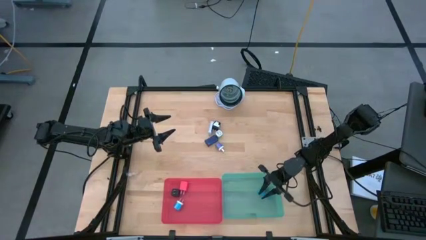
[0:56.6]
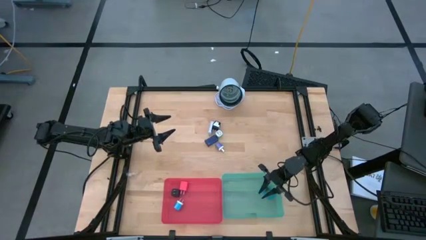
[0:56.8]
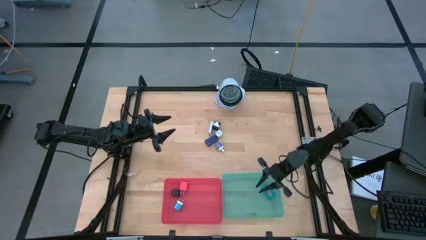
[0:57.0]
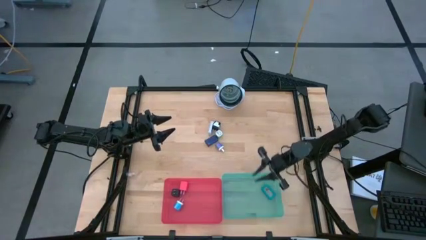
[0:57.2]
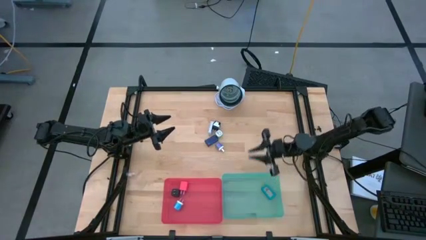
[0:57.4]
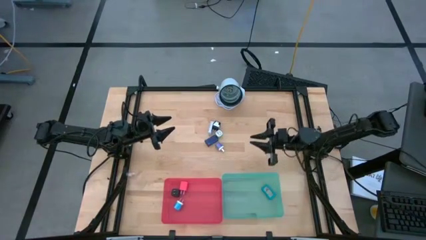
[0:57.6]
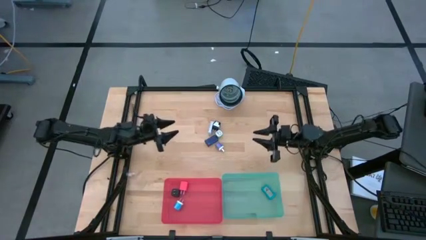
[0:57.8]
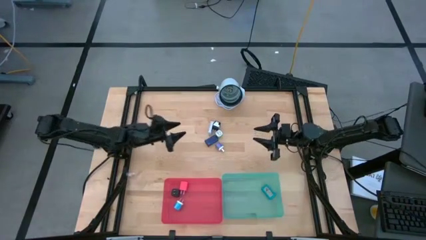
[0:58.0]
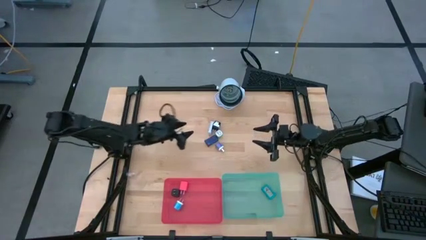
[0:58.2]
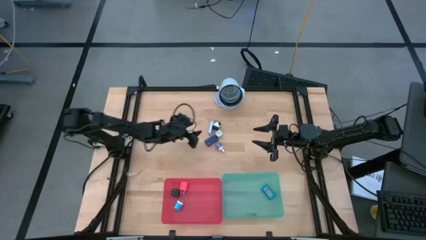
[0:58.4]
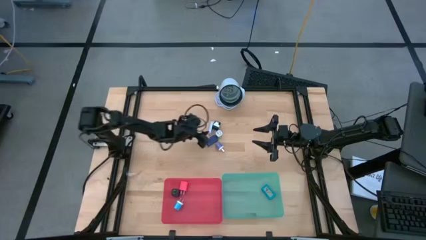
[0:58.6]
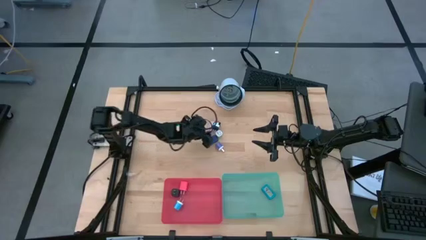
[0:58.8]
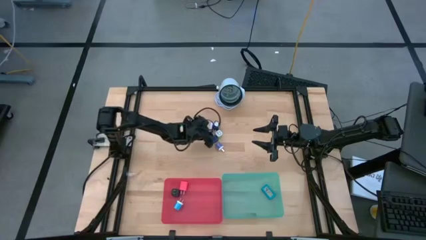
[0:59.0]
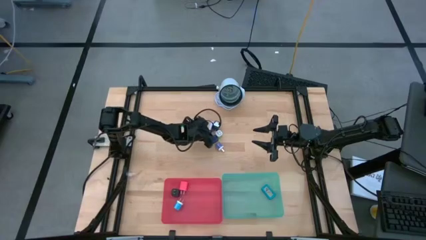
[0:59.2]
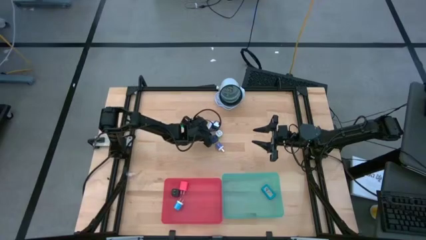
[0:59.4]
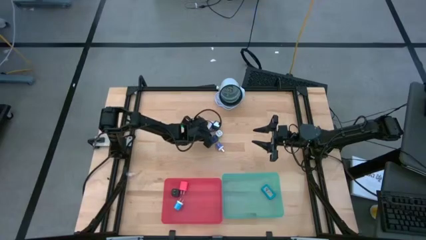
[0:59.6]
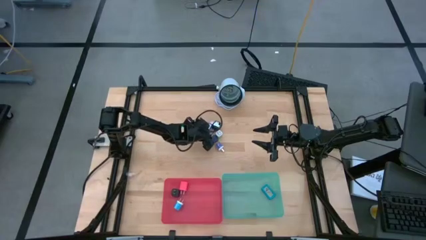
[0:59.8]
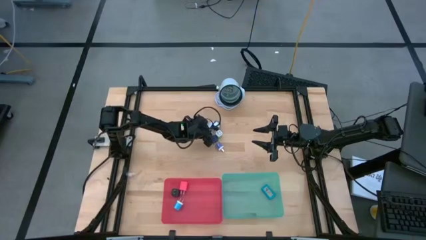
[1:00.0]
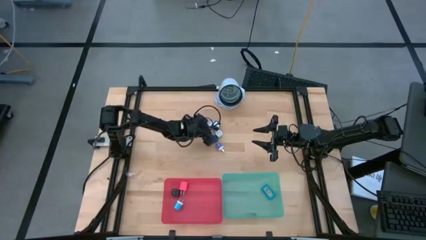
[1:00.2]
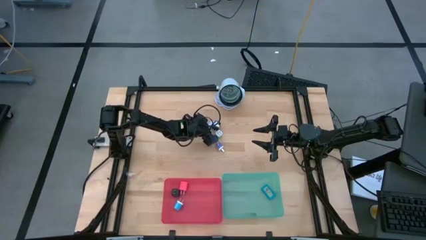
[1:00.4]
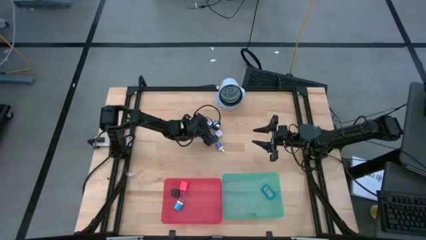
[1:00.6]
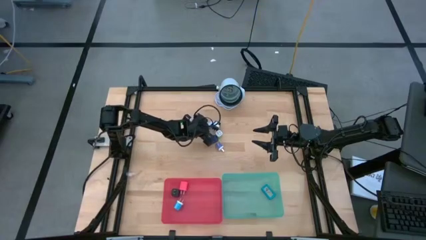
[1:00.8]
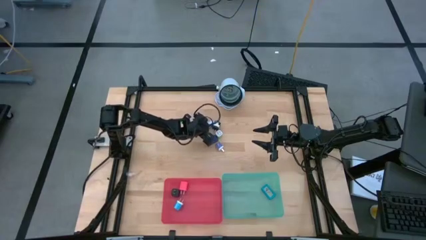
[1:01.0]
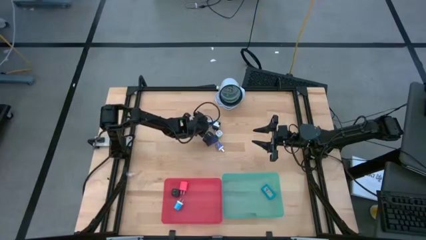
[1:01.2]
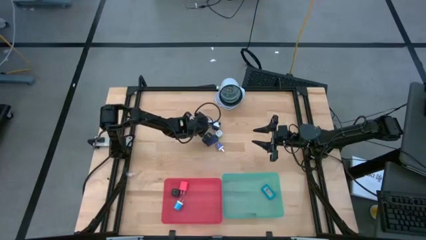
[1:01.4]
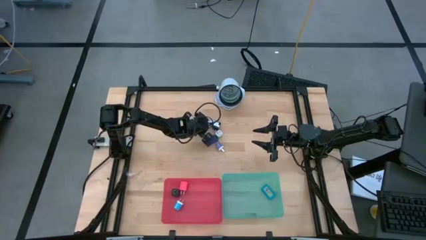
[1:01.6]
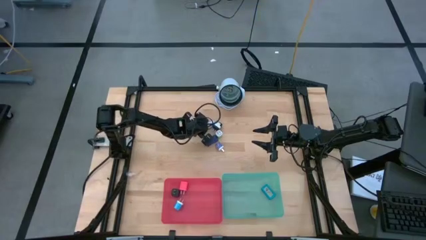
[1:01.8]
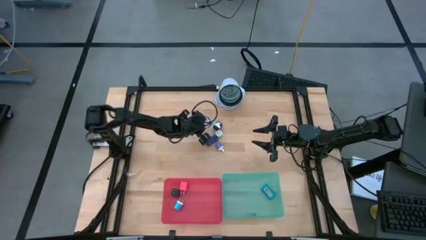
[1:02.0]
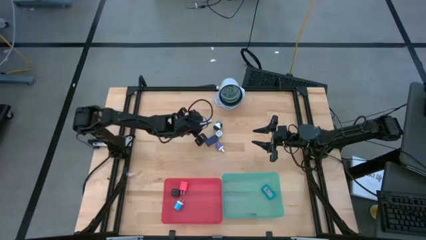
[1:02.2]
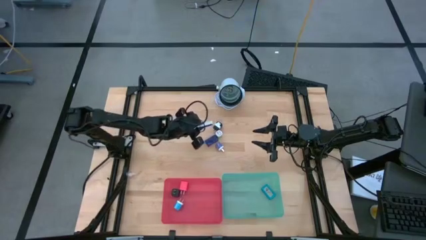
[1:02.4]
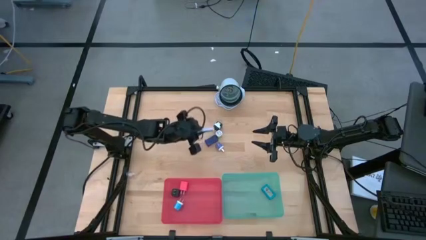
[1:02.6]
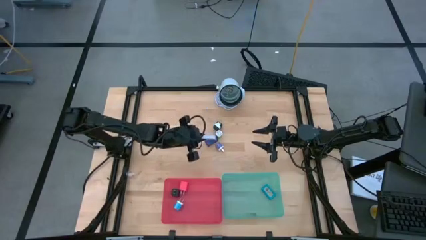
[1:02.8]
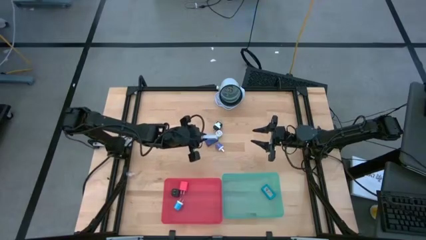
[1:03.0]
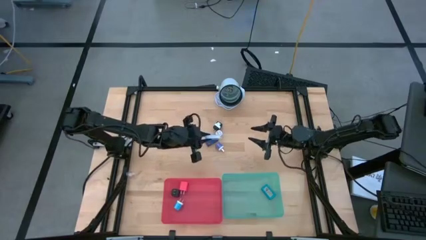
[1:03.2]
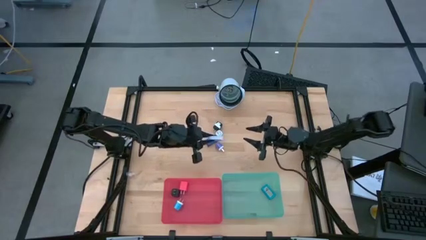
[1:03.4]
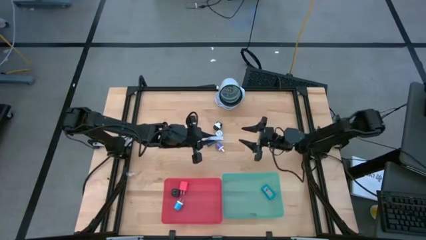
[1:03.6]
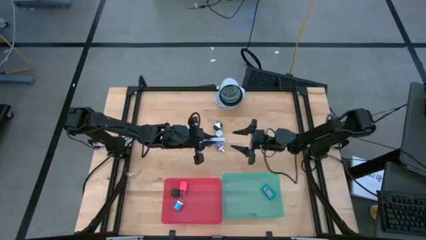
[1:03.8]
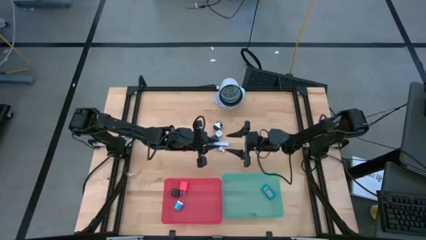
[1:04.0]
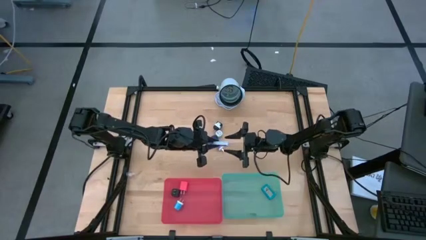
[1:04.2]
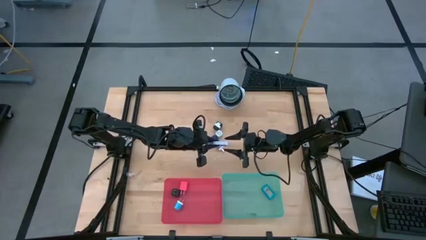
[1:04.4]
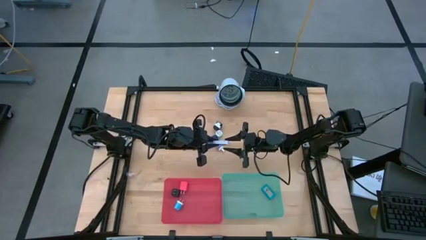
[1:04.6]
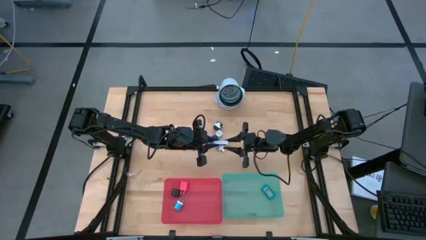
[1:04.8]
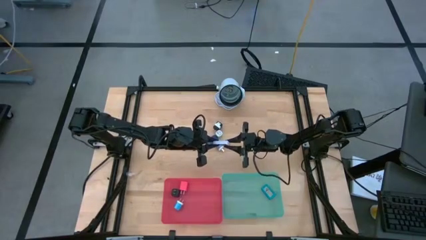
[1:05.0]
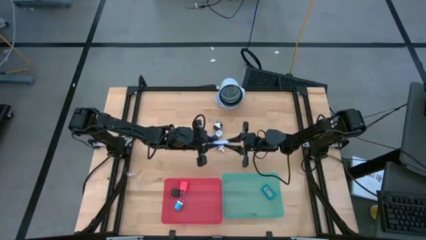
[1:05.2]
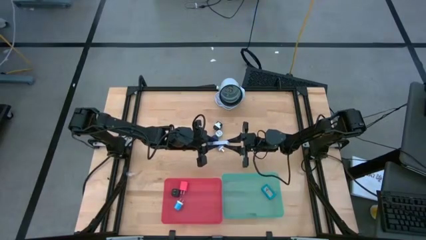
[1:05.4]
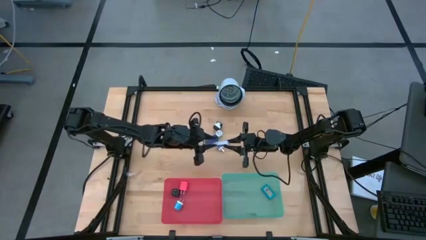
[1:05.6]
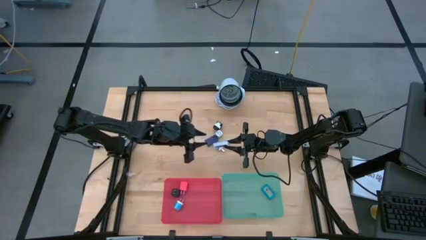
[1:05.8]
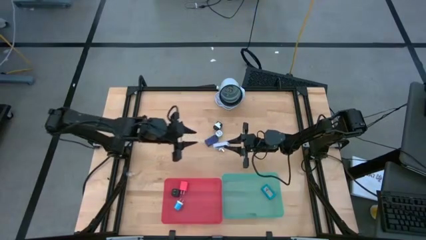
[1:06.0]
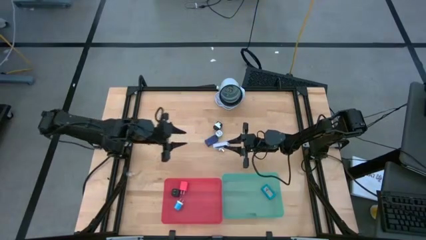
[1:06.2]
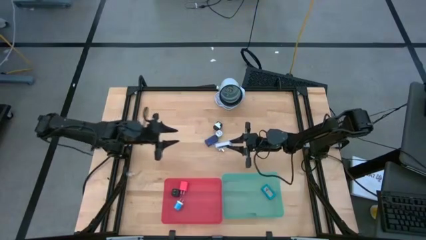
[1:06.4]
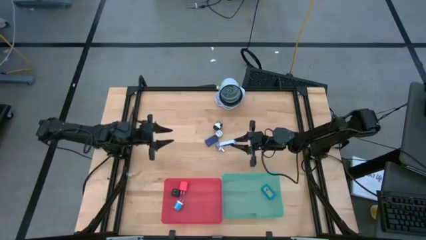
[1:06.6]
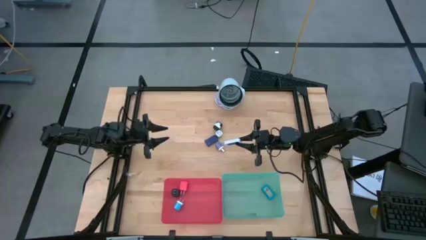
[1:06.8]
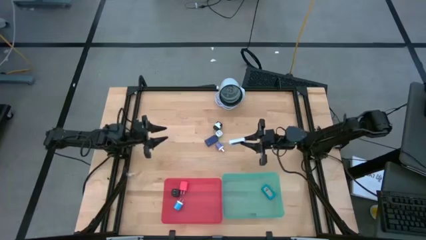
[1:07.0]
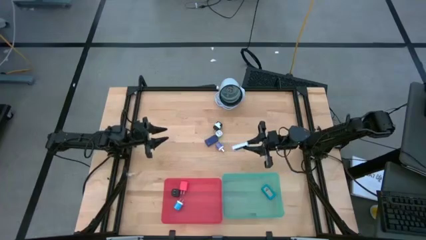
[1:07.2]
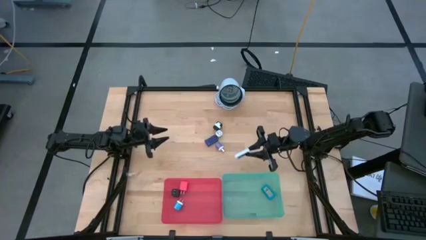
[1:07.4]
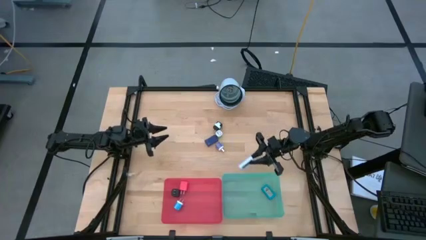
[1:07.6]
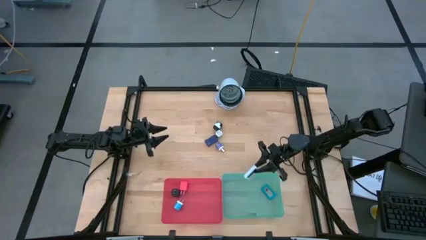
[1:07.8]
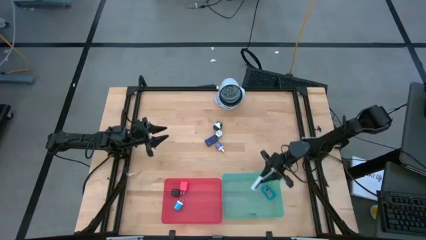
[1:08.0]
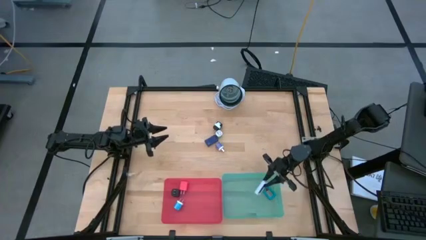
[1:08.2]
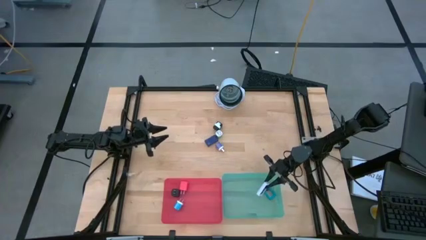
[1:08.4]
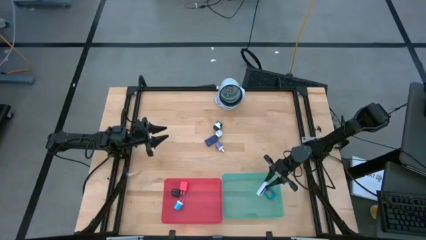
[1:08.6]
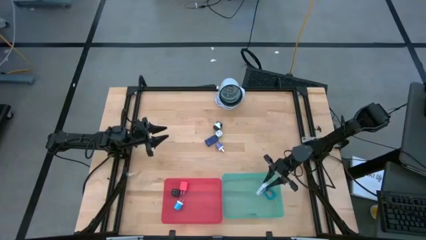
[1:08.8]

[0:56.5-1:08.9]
Task: Pick & Place Office items
Put the white digital clock into the blue bin
